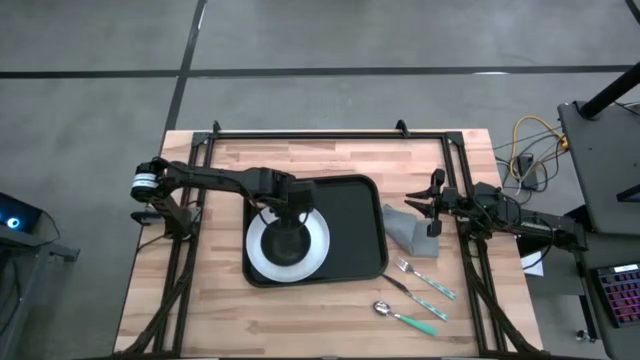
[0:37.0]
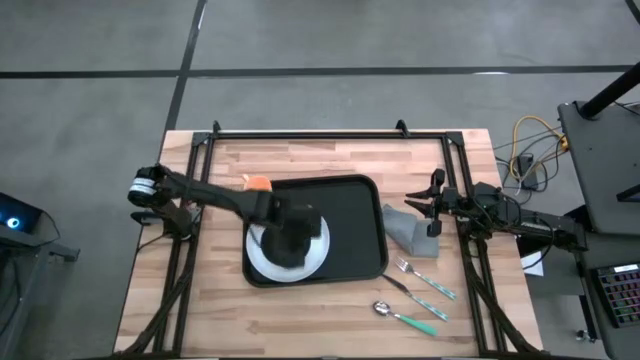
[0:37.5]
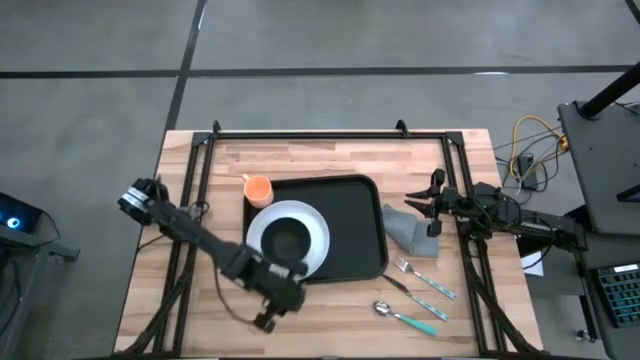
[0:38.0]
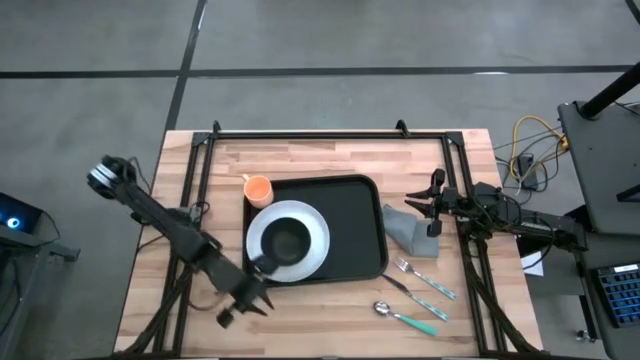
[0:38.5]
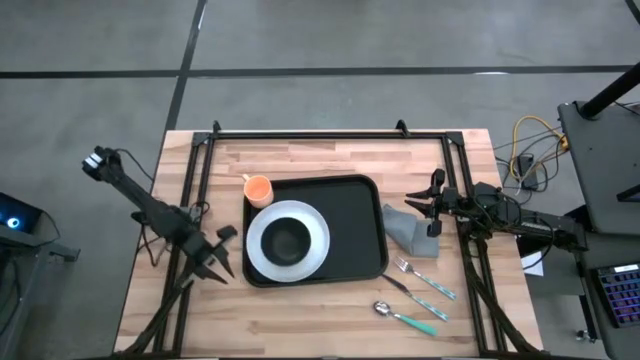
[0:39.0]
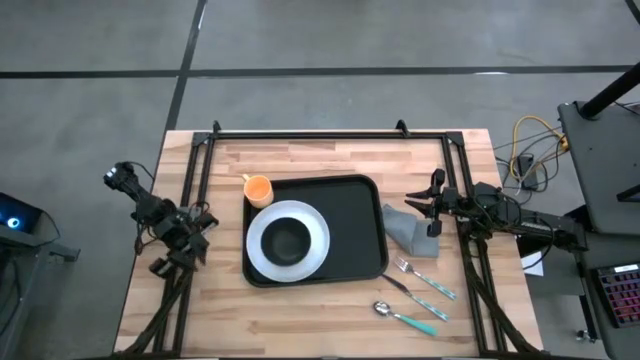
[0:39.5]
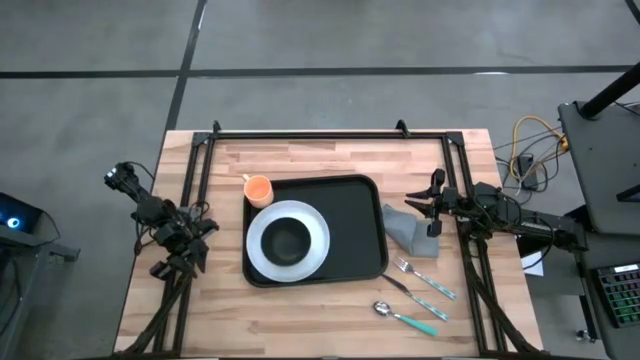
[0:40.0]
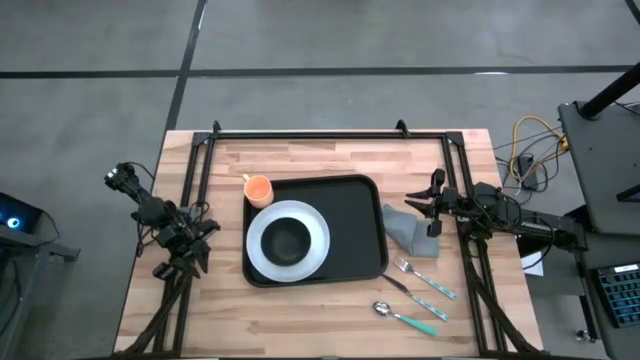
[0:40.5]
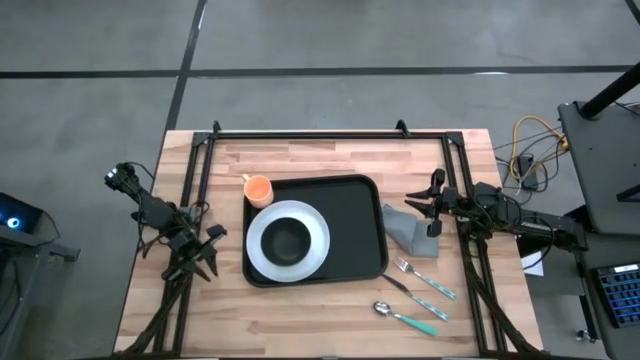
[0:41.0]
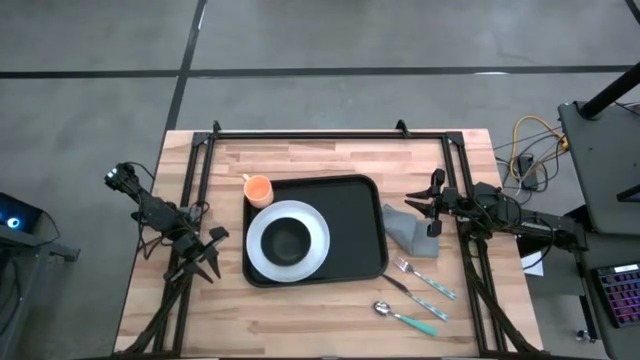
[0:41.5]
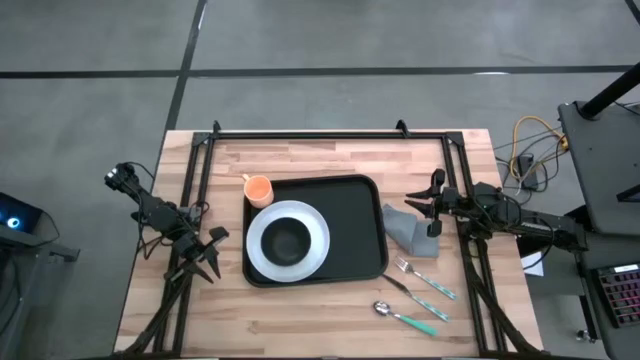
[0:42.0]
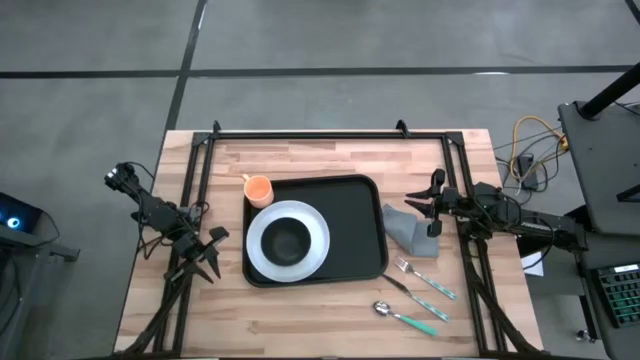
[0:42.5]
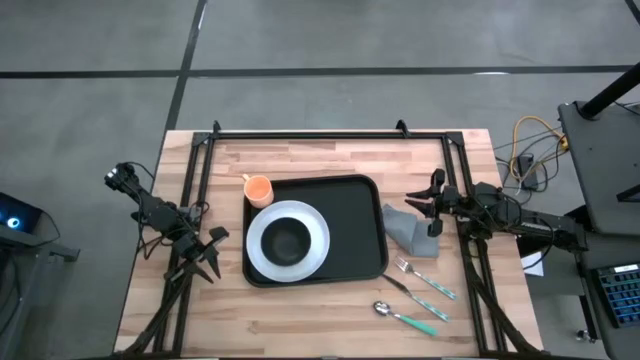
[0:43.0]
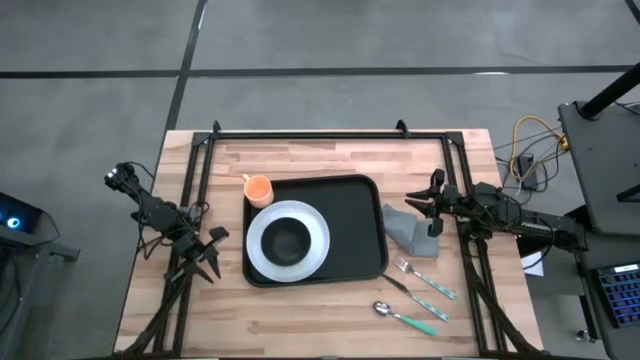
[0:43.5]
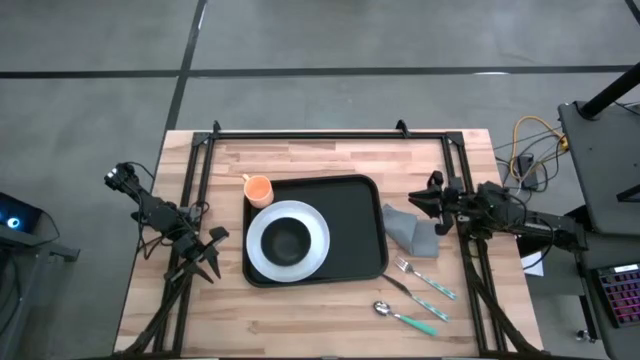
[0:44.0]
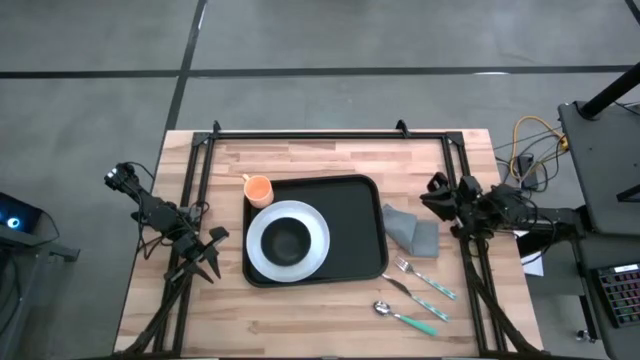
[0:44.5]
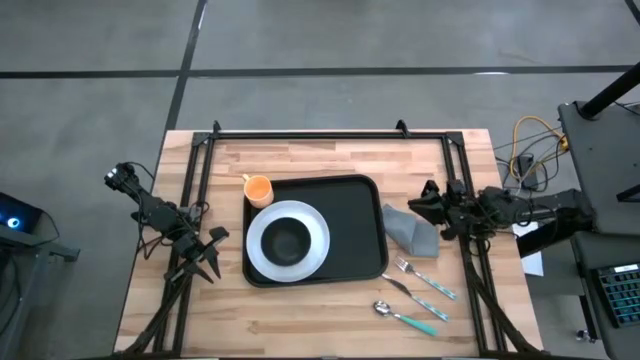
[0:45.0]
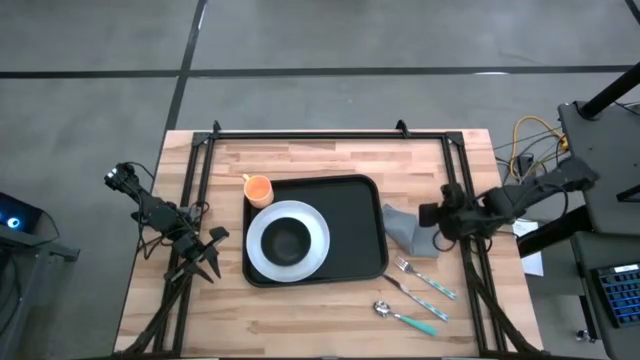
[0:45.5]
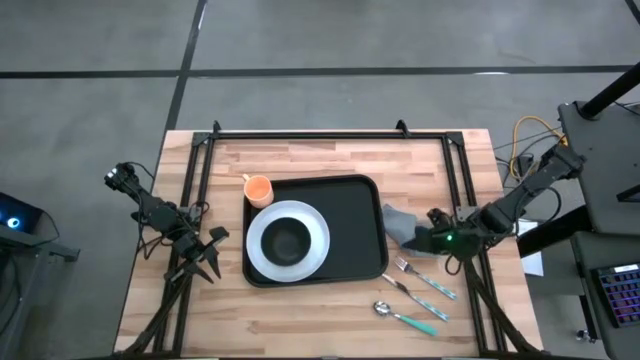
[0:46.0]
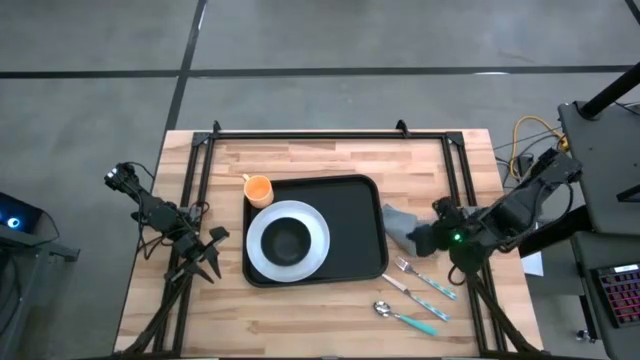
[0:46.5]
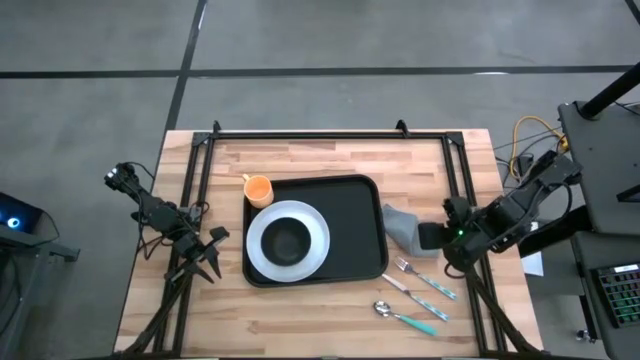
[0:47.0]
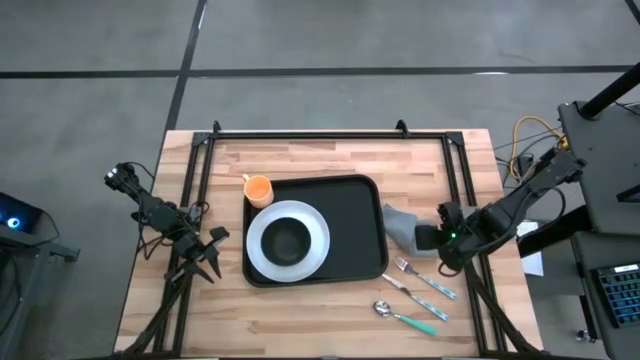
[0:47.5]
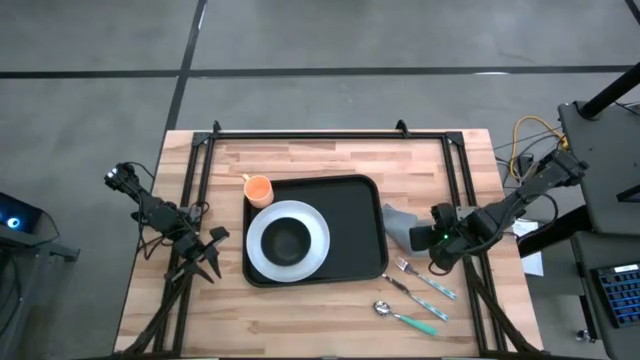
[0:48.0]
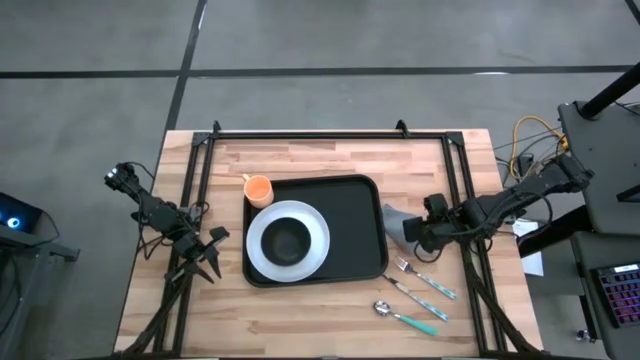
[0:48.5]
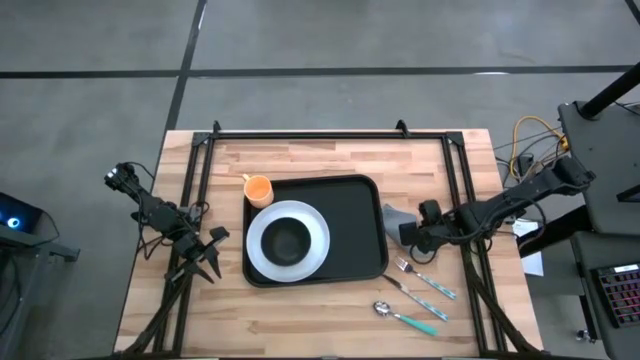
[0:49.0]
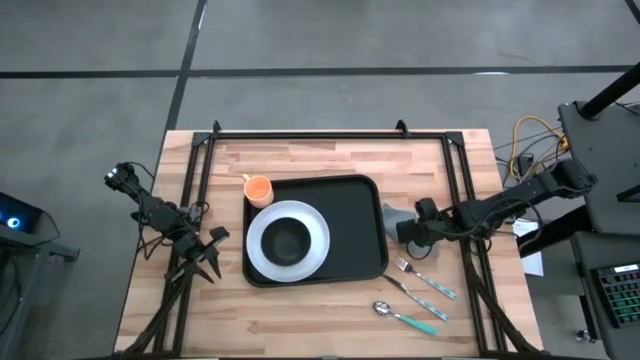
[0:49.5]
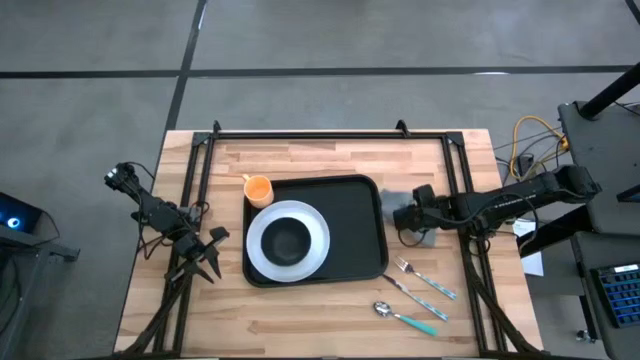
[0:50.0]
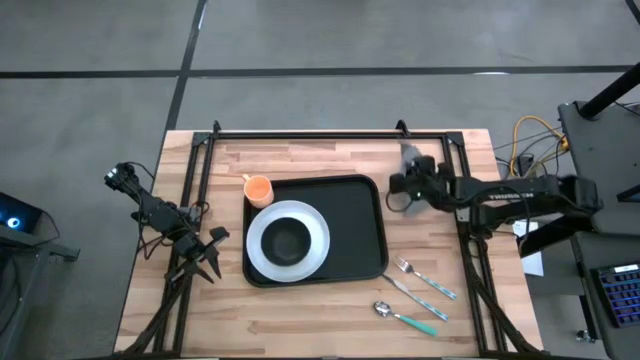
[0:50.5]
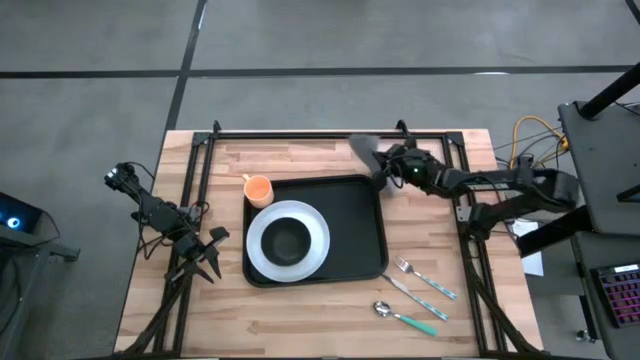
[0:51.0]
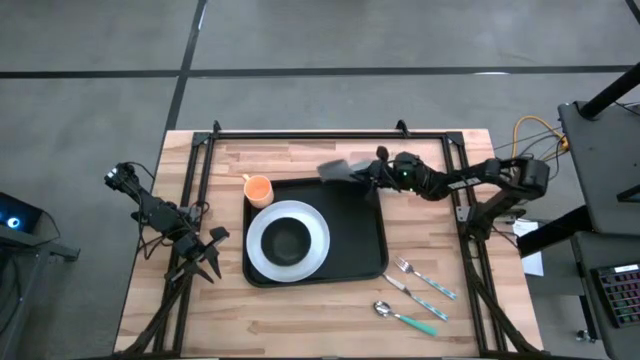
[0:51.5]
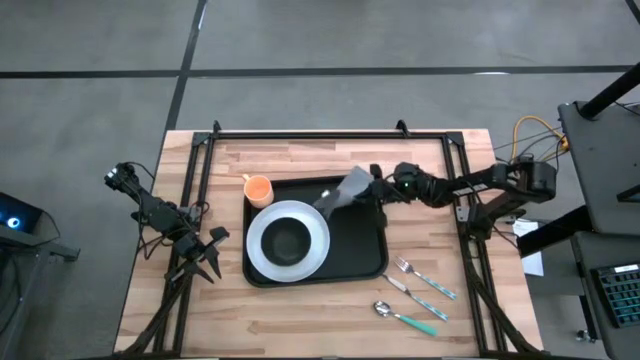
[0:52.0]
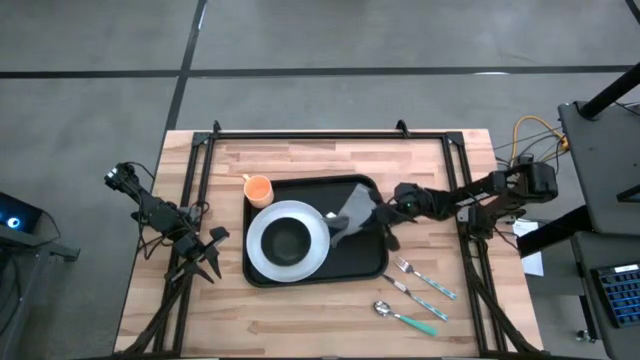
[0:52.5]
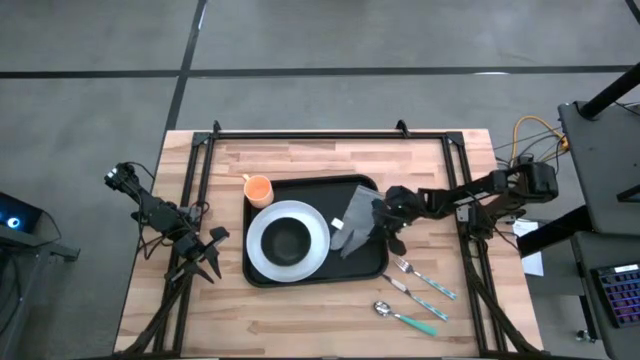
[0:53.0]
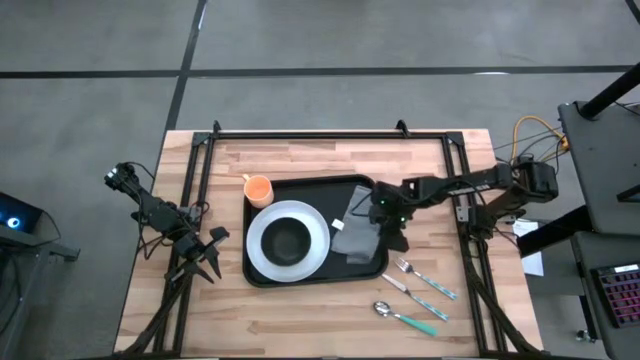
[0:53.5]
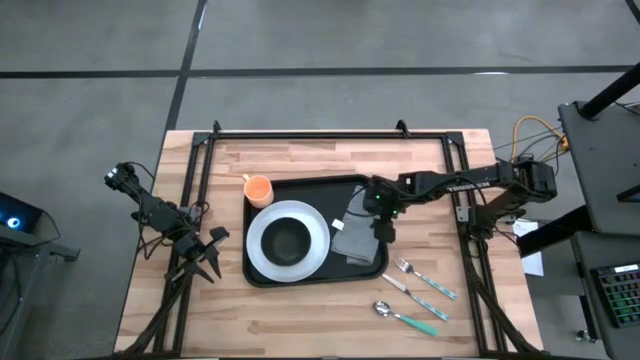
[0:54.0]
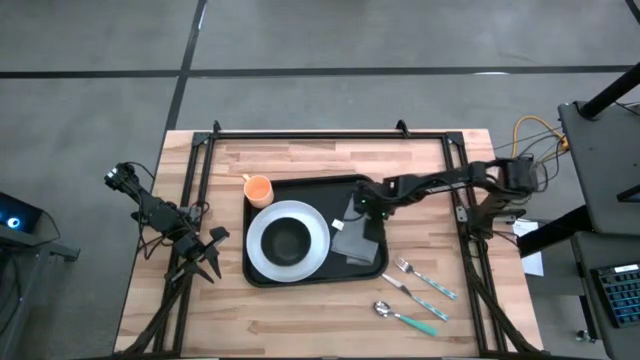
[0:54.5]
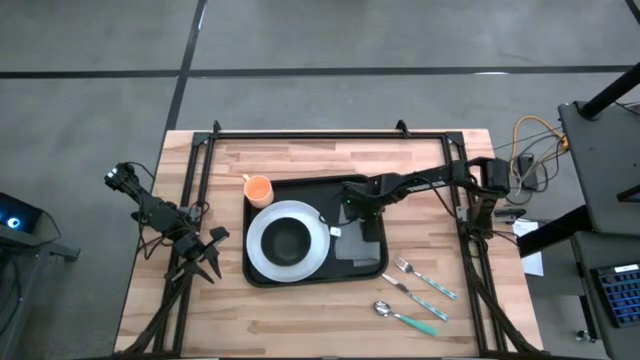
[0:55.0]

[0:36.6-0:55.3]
Task: Set up tray
Put the gray table napkin to the right of the white plate on the black serving tray
